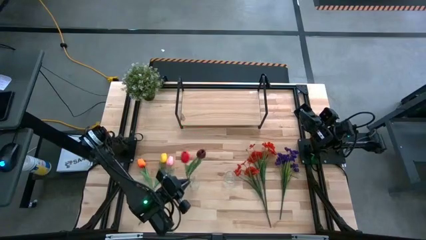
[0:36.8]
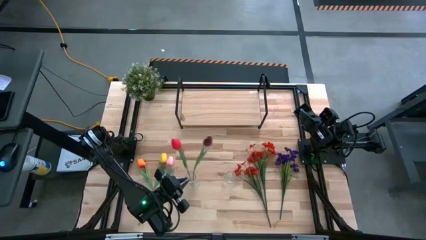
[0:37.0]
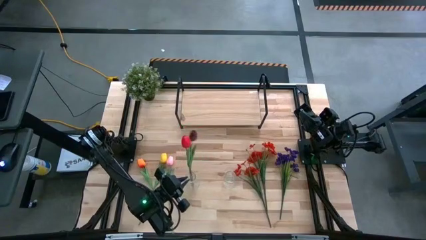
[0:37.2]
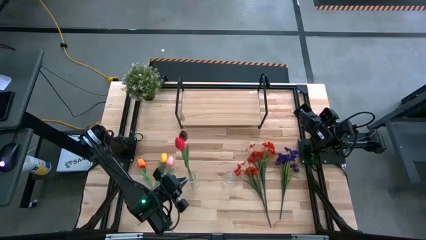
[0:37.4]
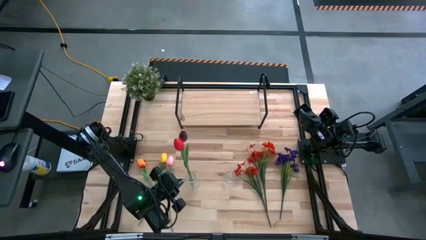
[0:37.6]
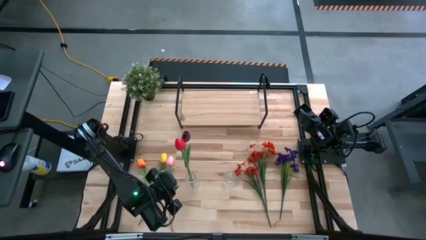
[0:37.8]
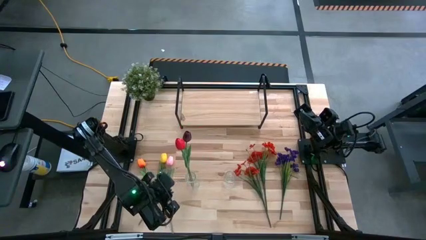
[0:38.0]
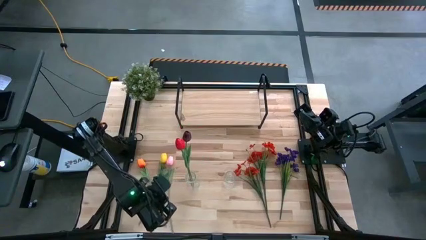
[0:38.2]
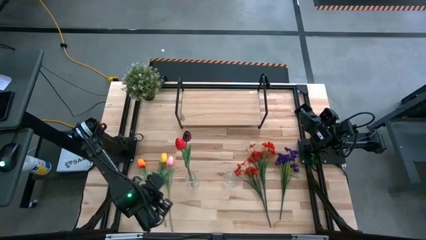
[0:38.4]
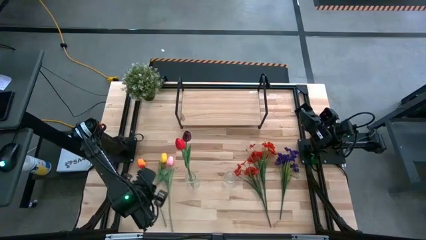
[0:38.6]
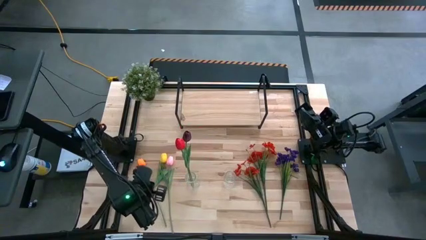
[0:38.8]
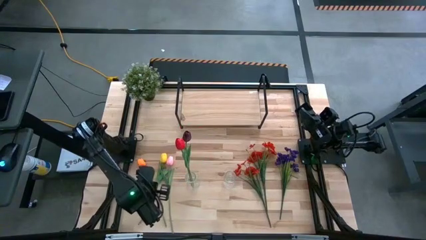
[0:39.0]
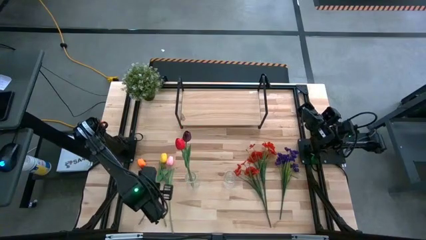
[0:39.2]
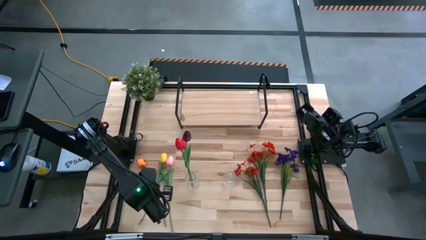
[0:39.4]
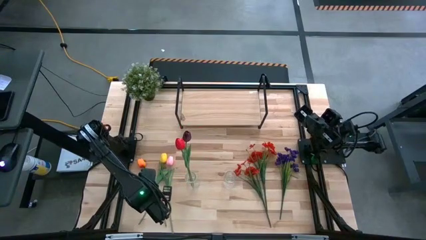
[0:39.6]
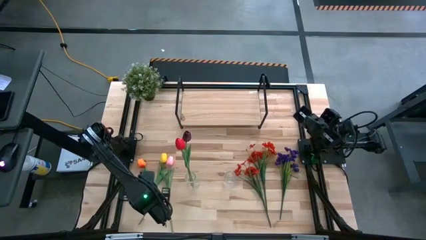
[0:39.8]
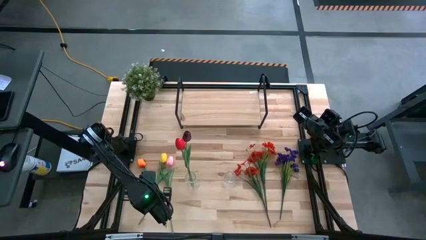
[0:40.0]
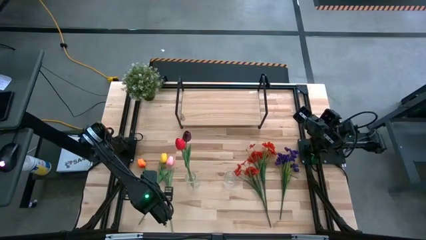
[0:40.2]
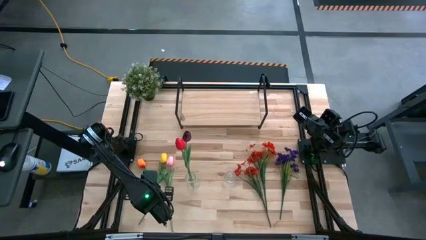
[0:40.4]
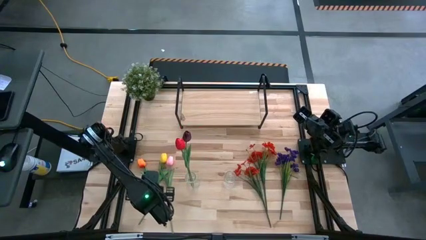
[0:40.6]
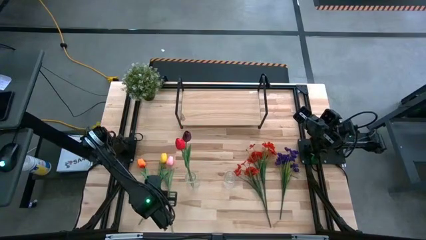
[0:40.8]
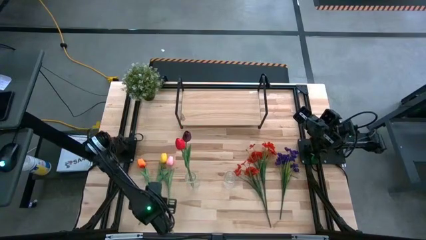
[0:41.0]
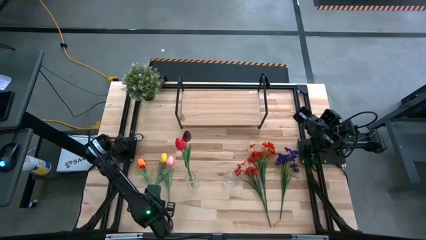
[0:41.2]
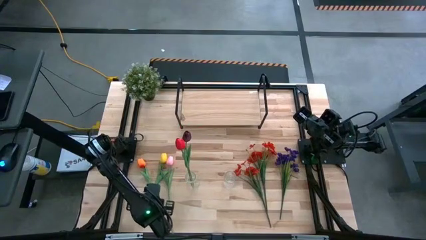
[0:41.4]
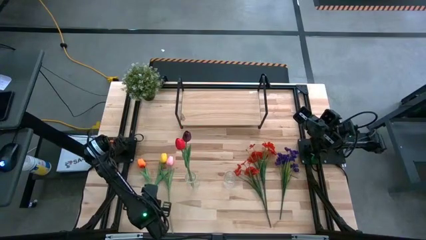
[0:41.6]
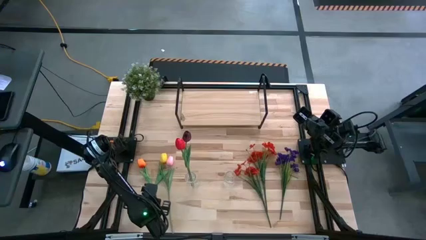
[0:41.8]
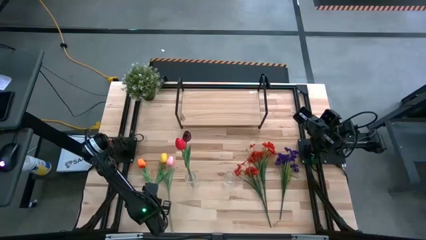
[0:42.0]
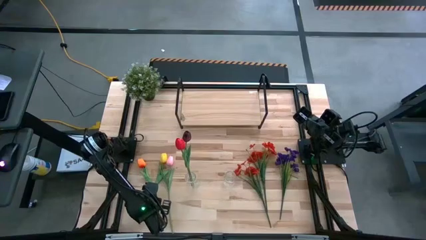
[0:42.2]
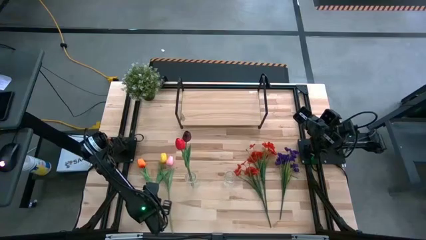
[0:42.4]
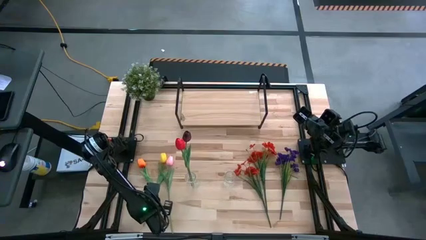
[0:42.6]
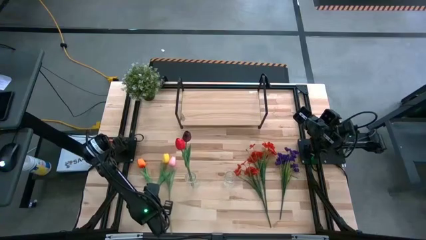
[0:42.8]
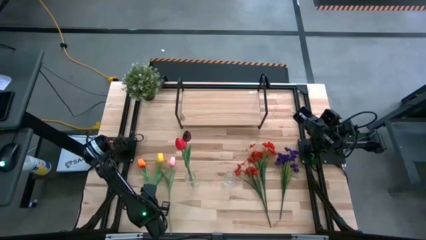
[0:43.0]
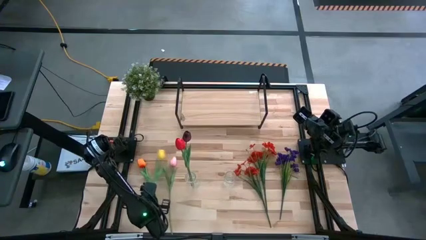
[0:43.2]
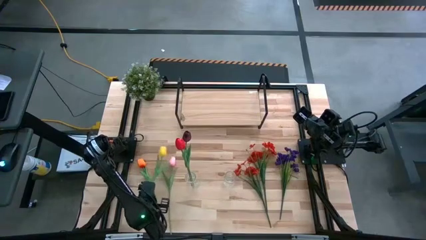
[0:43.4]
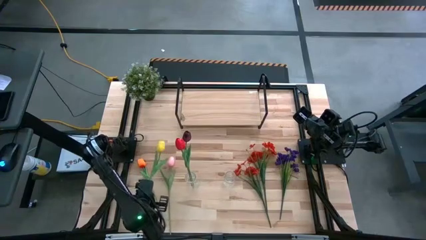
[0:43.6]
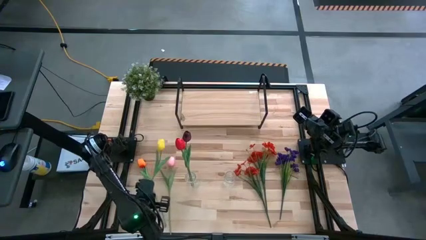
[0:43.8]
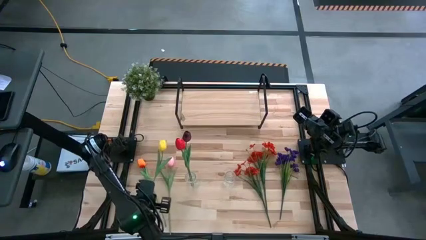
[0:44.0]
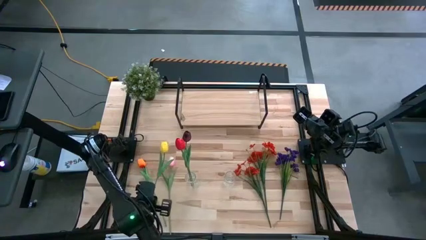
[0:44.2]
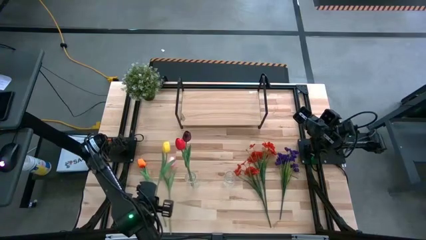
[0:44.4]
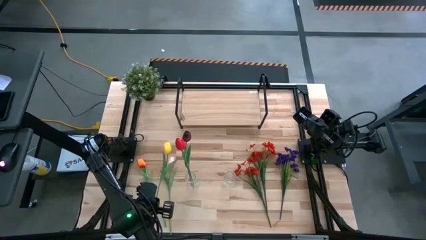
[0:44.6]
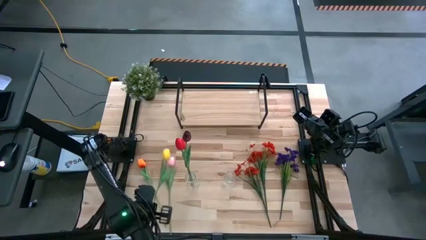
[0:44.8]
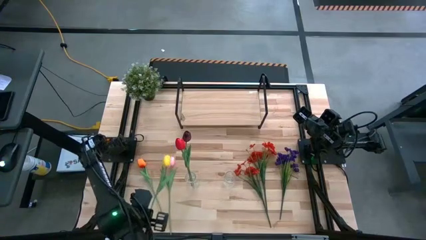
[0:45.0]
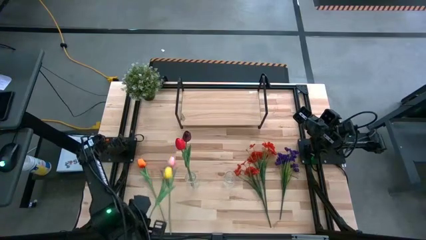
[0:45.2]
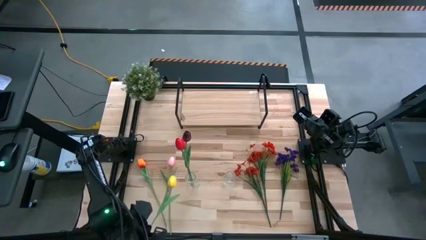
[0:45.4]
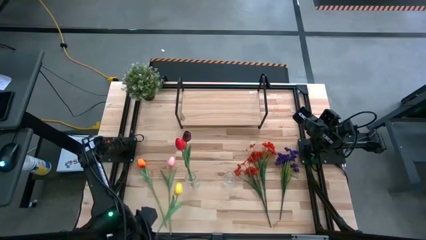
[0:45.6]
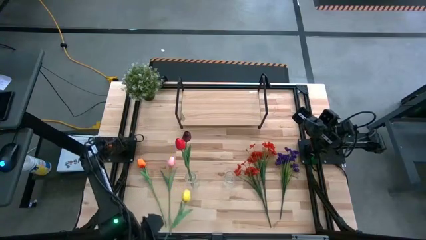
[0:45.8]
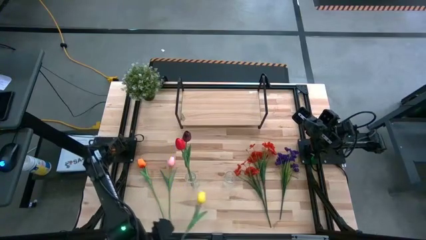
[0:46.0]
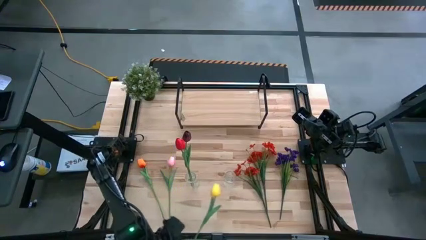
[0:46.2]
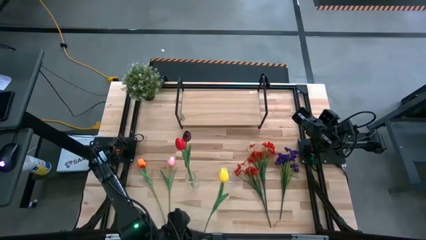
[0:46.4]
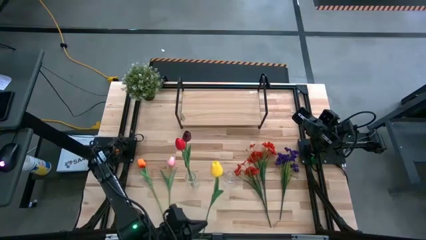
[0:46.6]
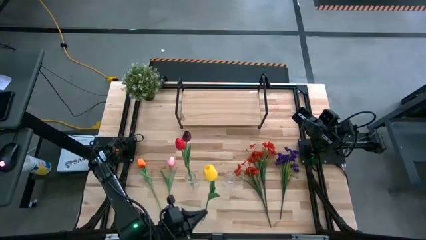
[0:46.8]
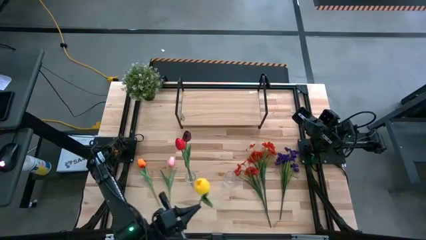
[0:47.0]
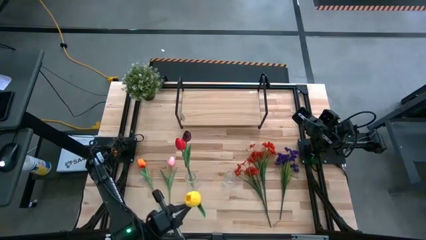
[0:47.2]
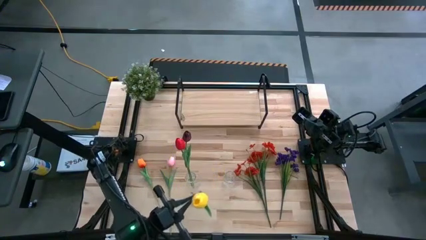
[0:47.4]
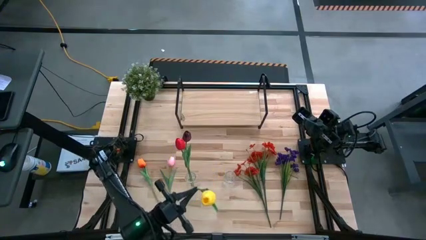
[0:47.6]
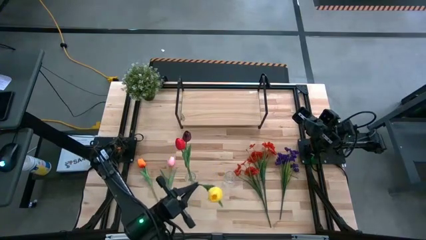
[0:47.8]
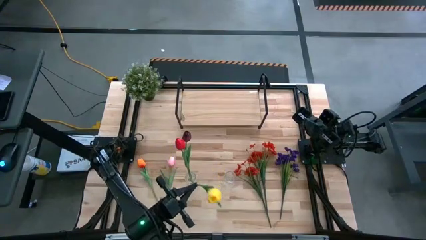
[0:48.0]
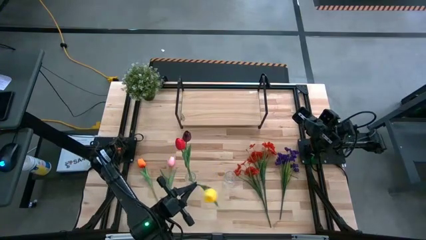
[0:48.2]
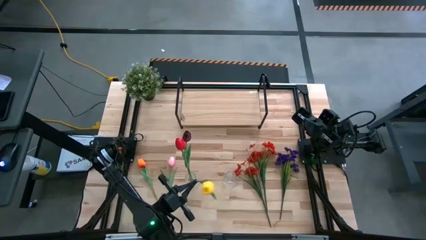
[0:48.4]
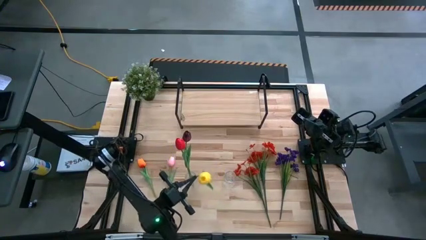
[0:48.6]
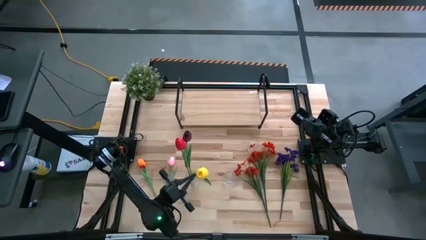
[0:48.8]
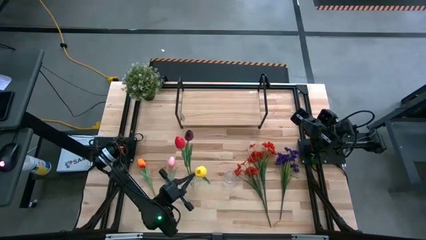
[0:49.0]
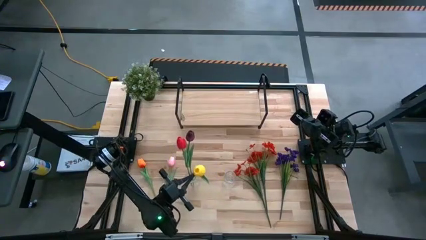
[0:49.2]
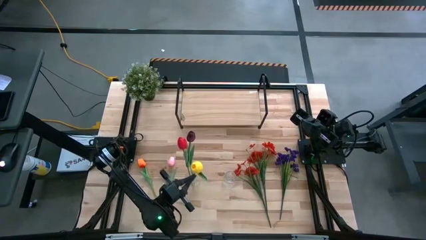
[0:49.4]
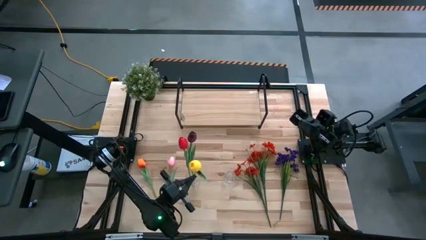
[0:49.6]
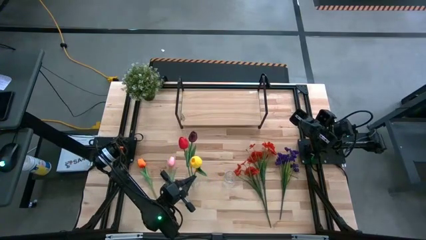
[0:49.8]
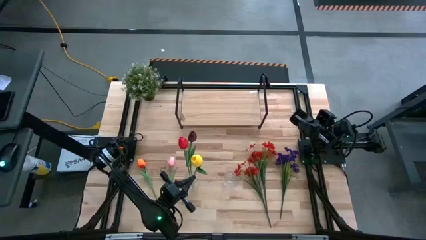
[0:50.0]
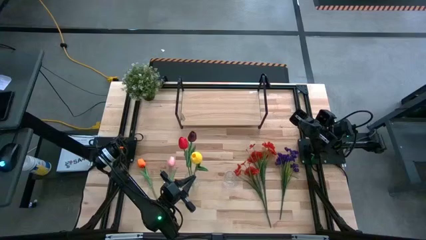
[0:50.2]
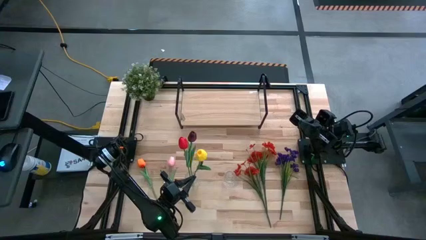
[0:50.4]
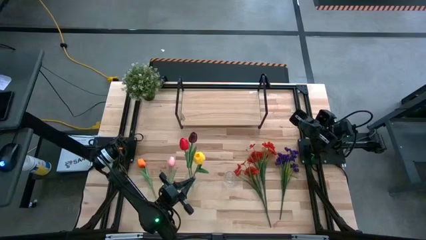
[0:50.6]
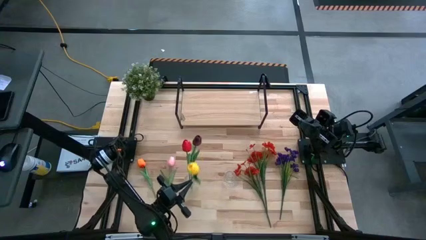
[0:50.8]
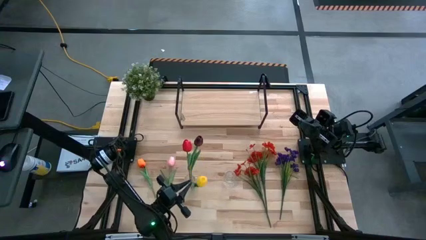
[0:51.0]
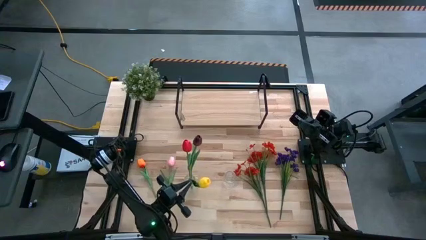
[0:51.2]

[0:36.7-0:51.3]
Task: Pick and place flowers into a vace then onto a shelf
Put the yellow flower into the left transparent vase
